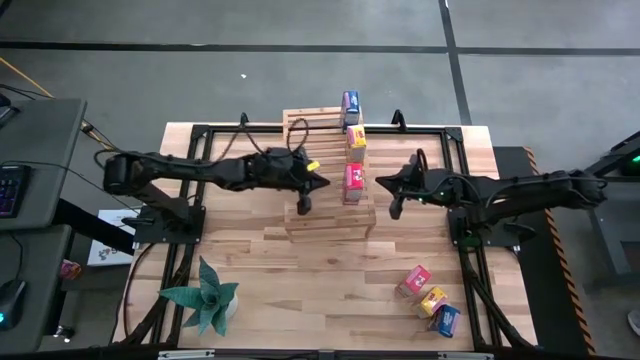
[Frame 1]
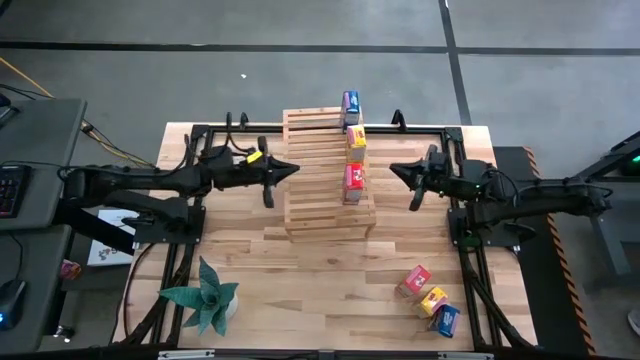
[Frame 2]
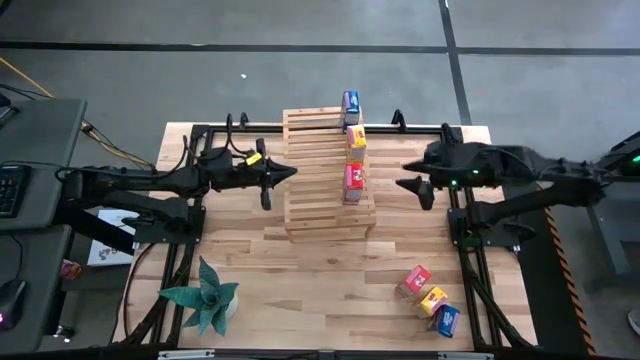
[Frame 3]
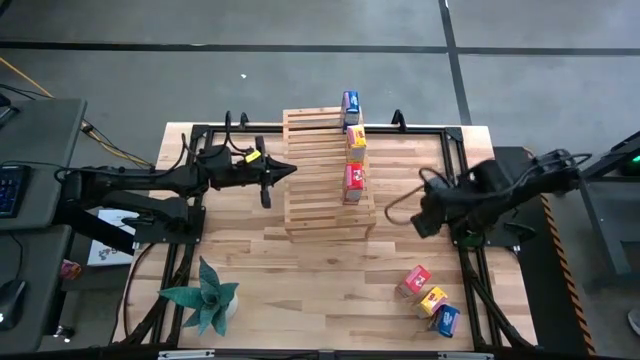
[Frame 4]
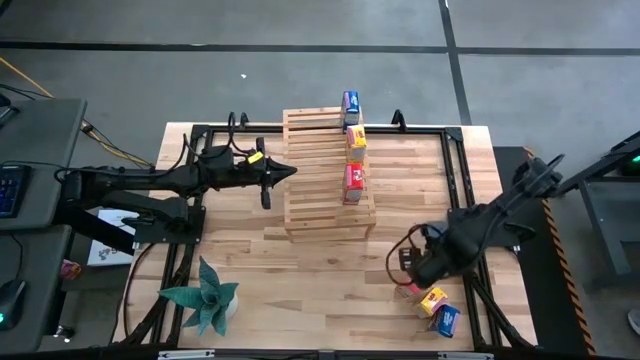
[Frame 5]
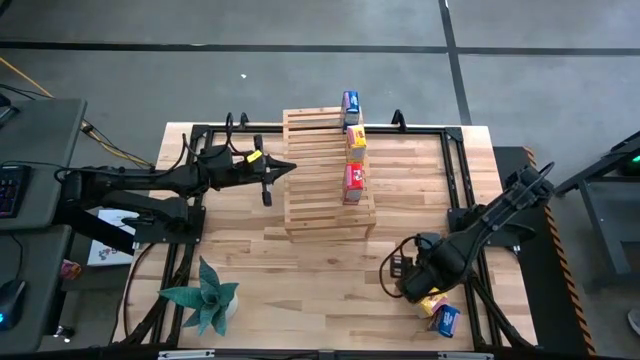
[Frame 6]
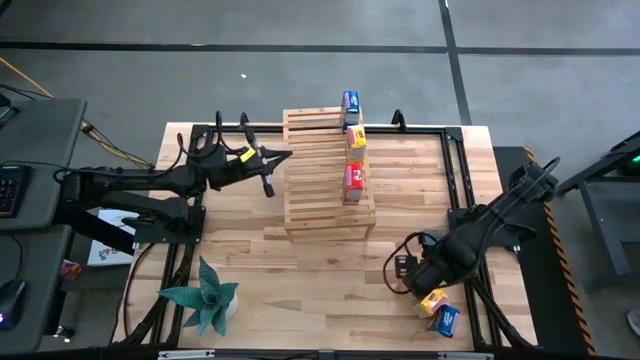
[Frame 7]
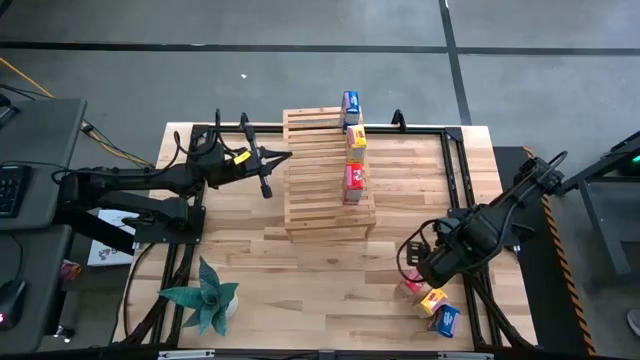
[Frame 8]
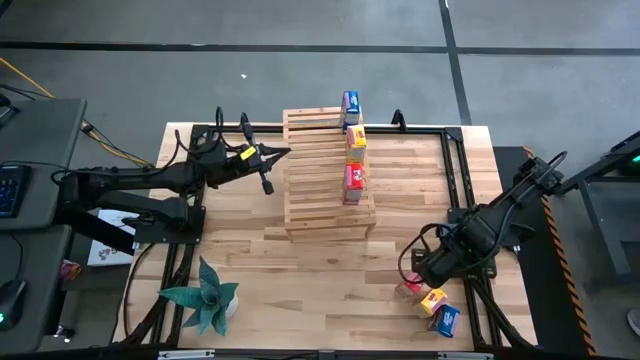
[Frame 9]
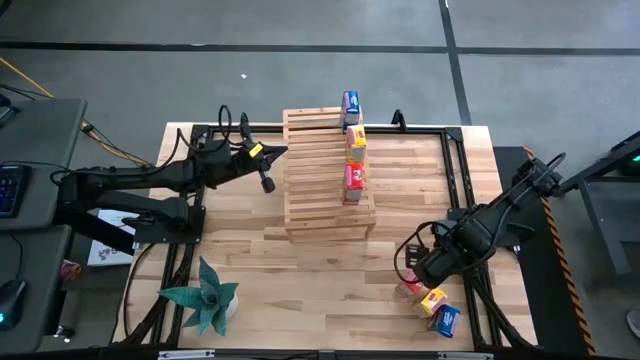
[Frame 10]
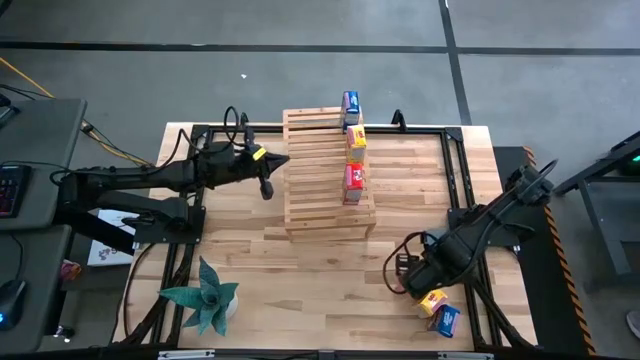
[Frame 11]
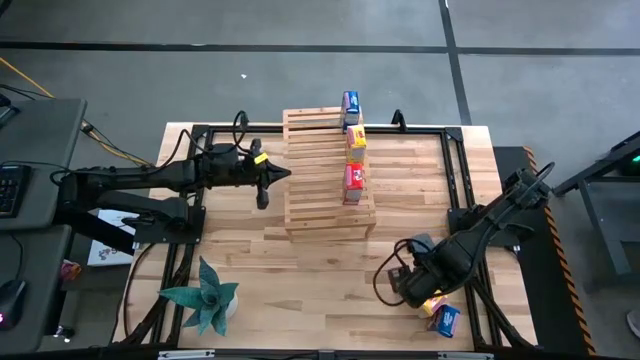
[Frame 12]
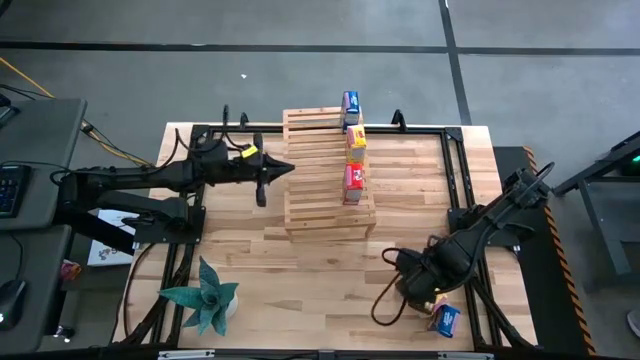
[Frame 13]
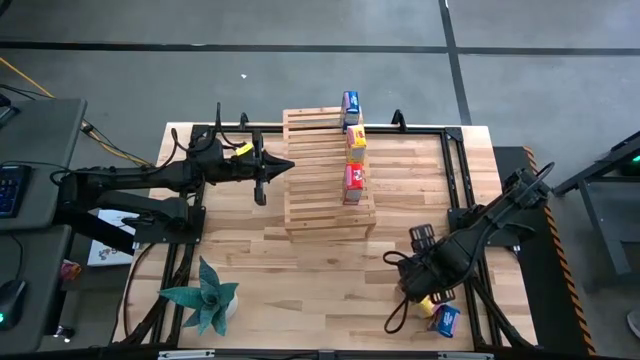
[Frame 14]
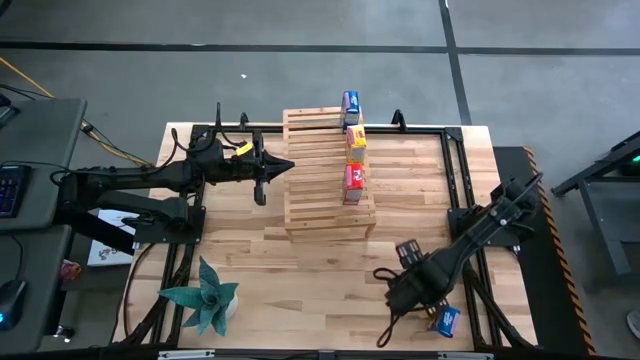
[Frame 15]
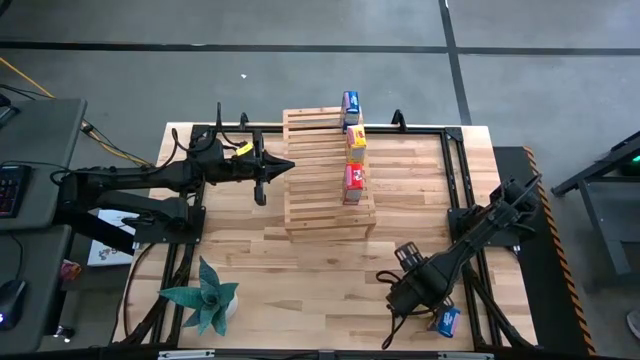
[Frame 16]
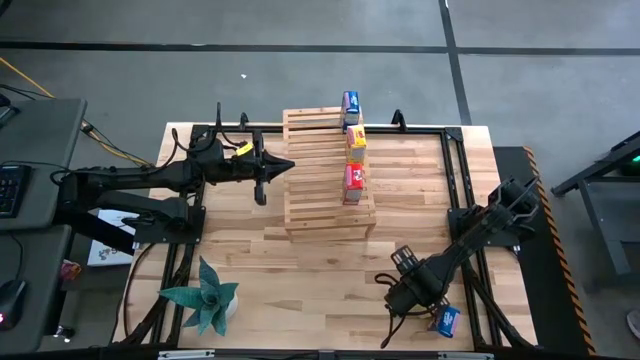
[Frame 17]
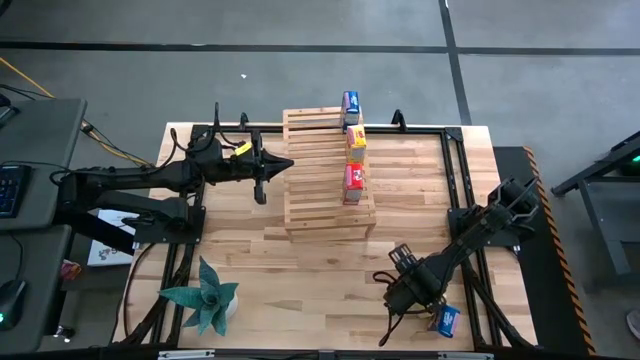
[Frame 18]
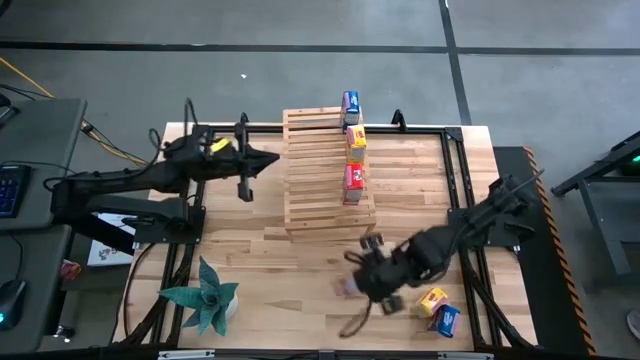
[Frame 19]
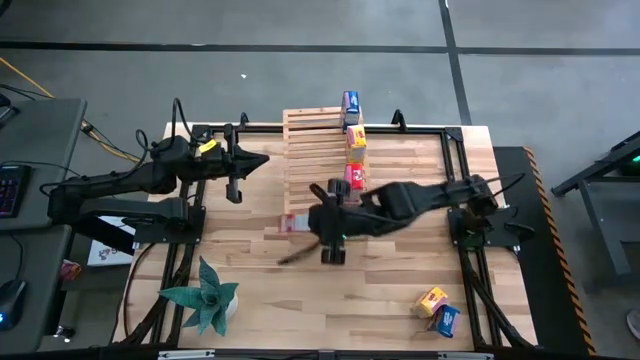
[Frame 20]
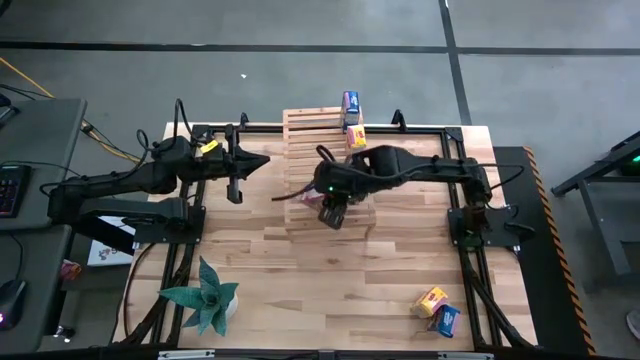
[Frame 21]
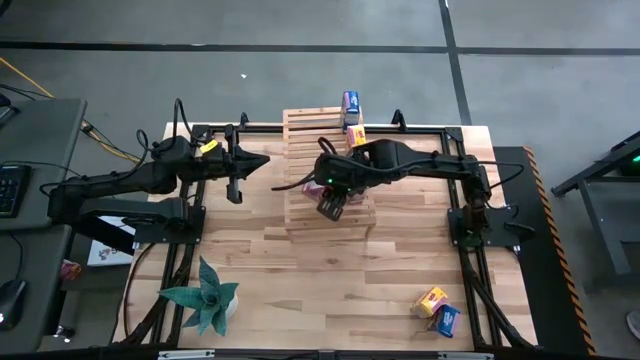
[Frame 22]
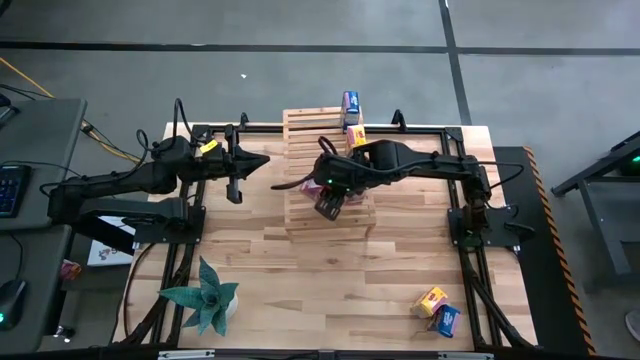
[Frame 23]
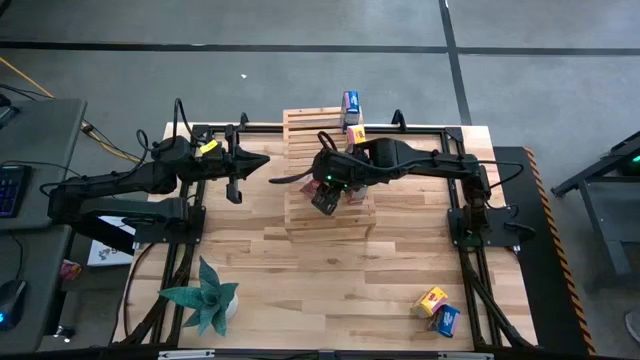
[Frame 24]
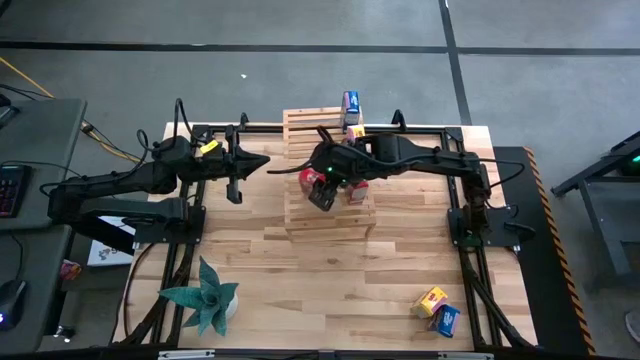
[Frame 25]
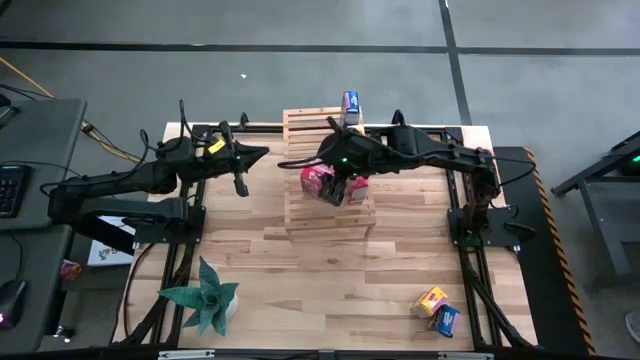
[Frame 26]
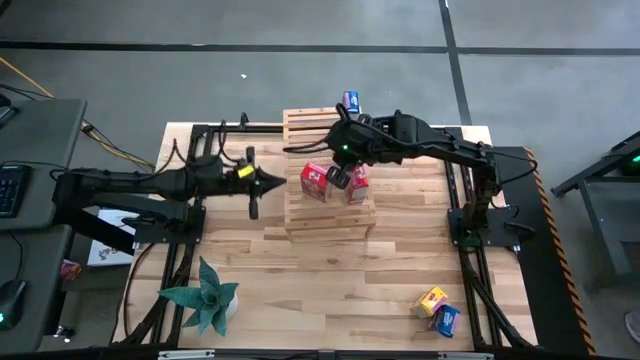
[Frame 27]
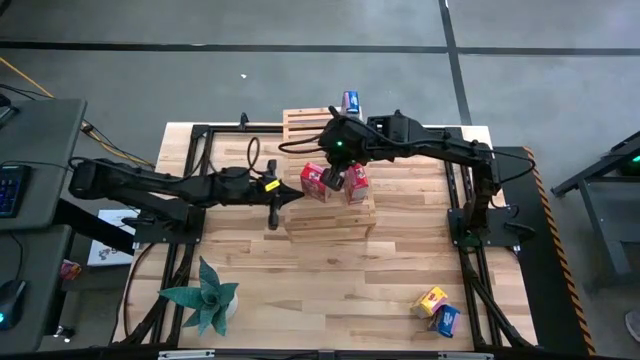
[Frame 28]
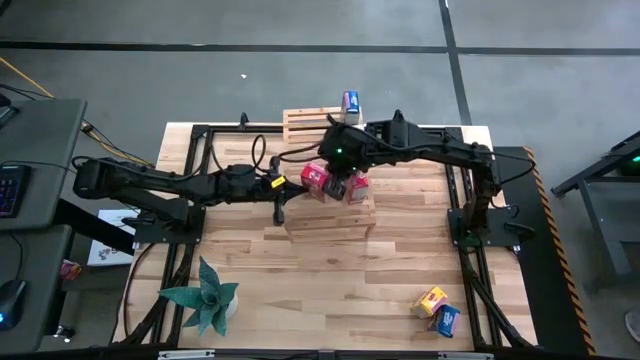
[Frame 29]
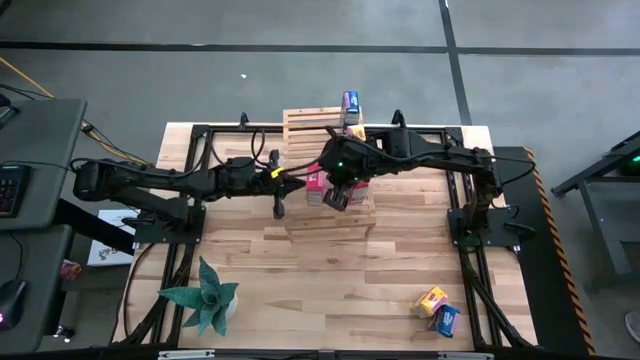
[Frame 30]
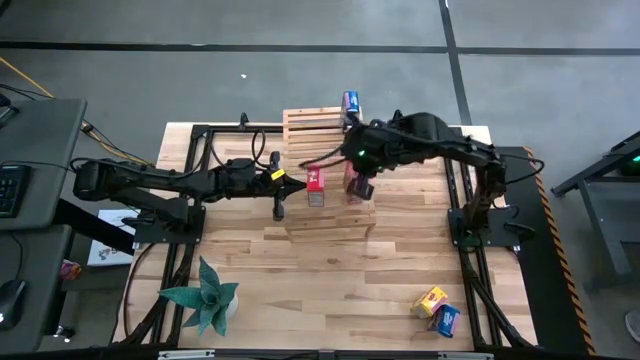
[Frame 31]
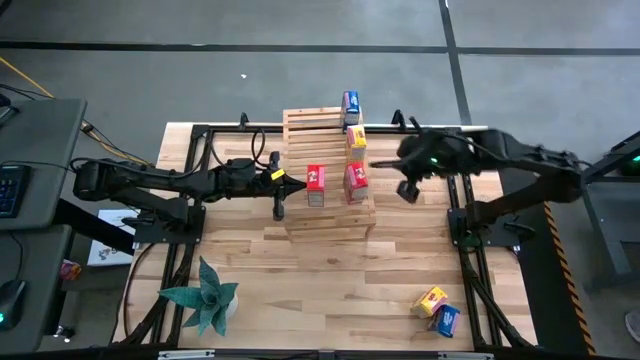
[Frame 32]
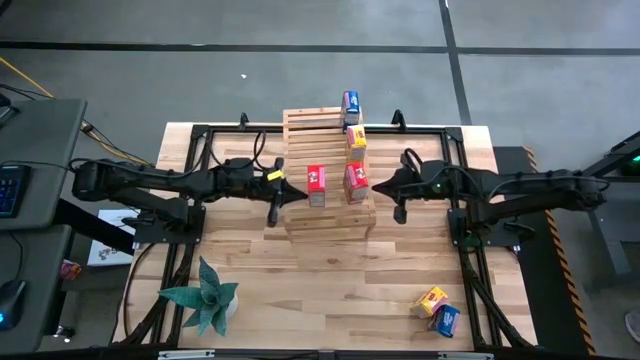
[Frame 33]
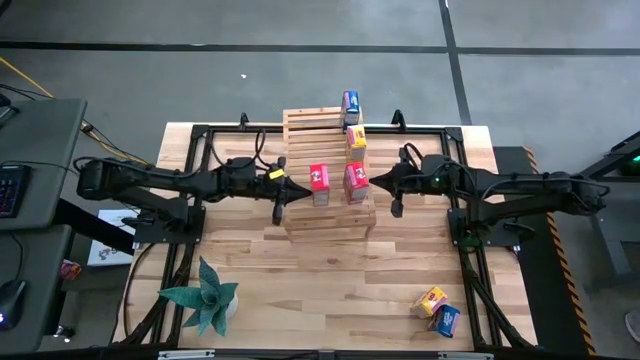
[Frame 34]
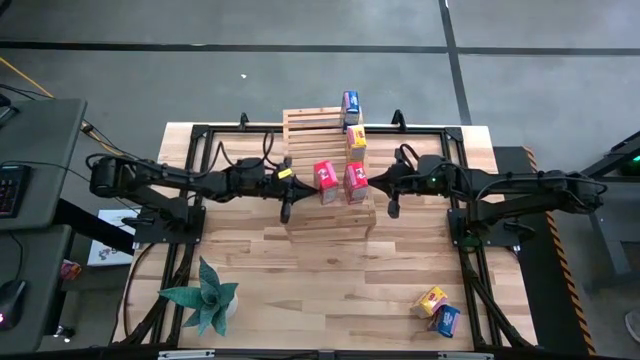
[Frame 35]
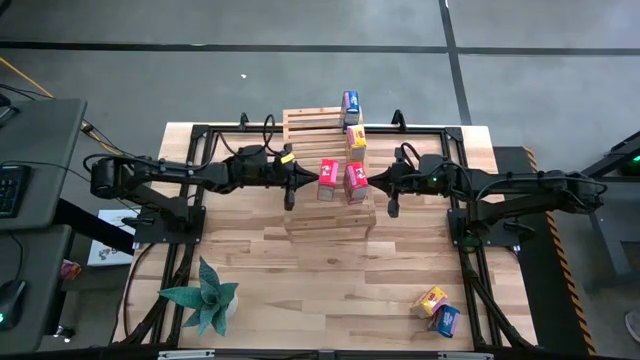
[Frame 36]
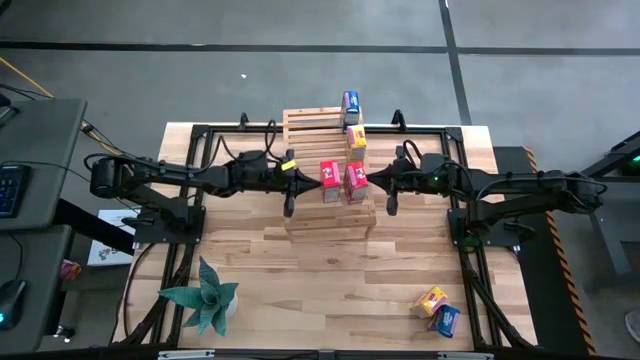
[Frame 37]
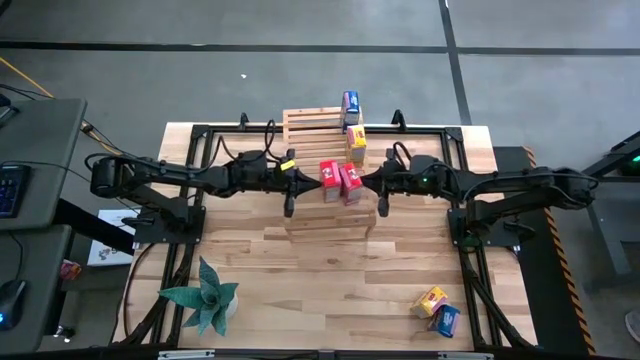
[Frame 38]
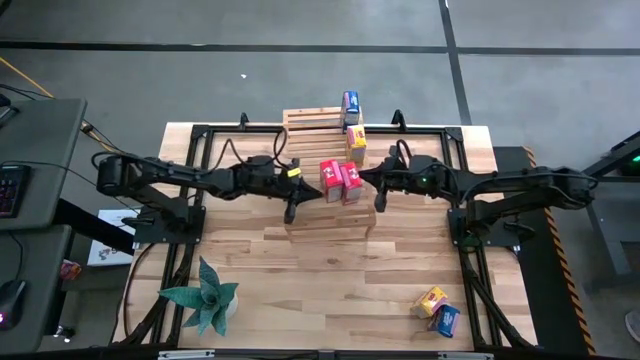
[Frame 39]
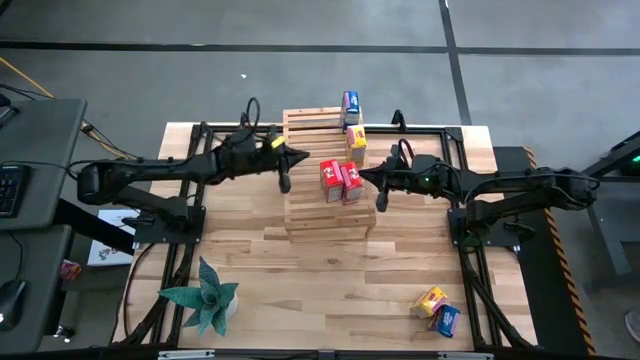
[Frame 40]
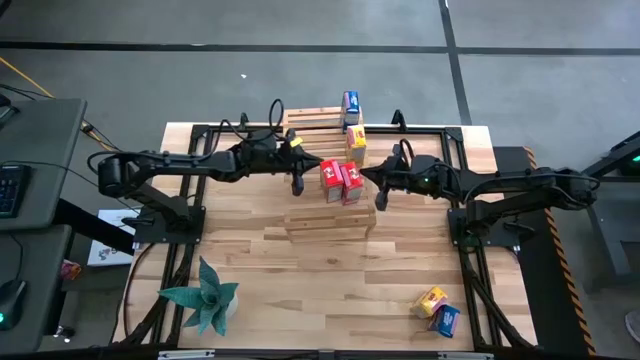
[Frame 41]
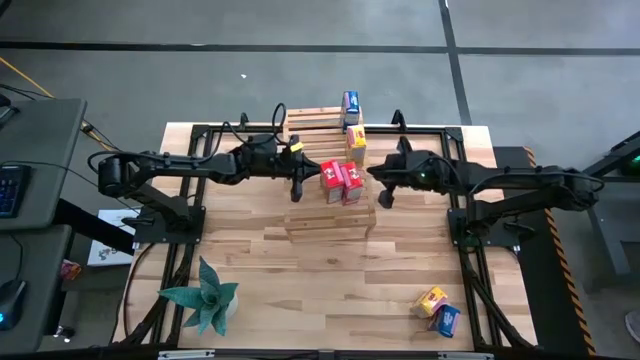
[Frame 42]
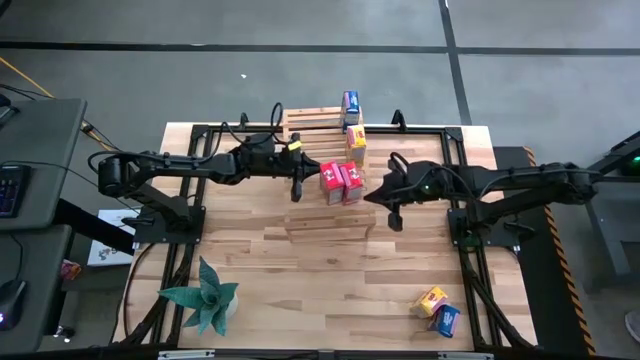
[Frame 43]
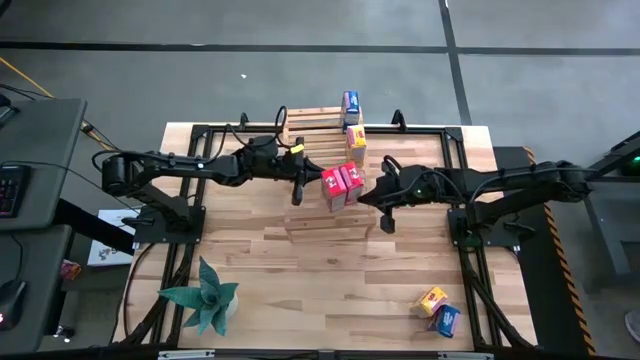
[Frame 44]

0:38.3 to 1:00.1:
Task: Stack cereal on shelf
Put the red cereal box on the shelf aligned with the other red cereal box

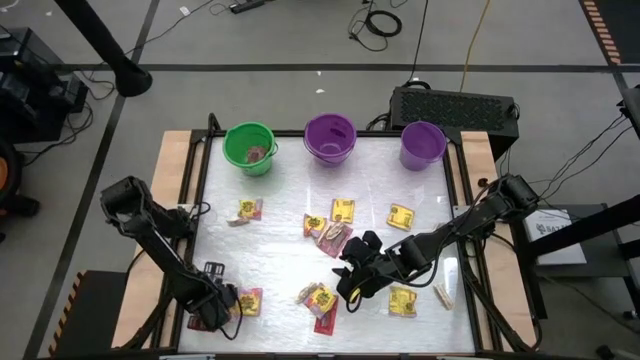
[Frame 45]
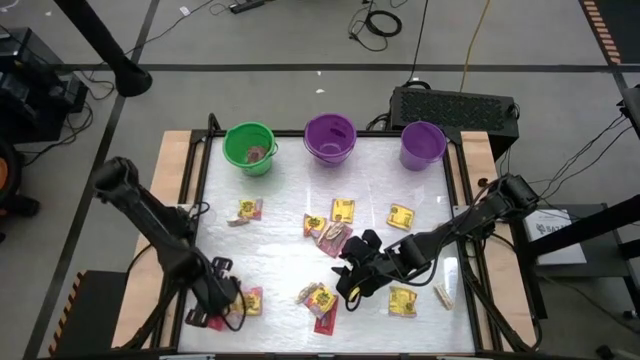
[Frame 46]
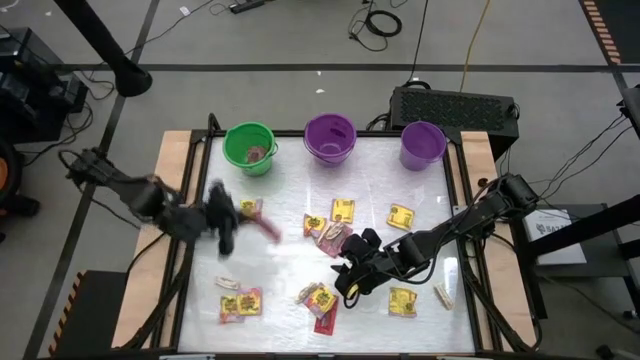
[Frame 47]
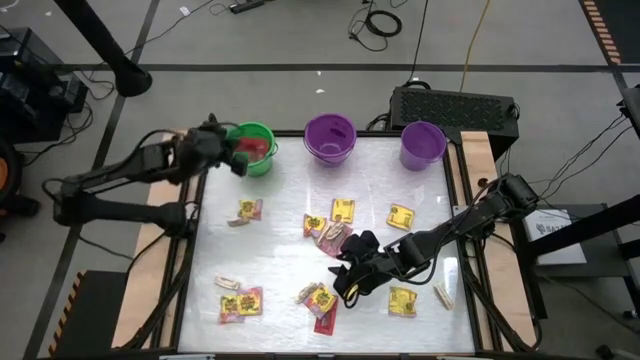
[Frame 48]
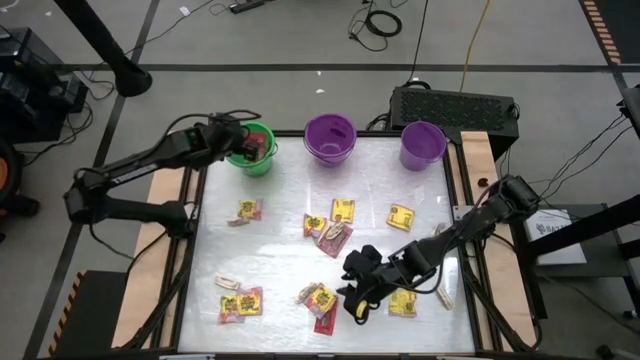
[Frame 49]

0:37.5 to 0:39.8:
Task: Sort candy by brand, put in halloween buckets
Put the red candy pack in the green bucket
